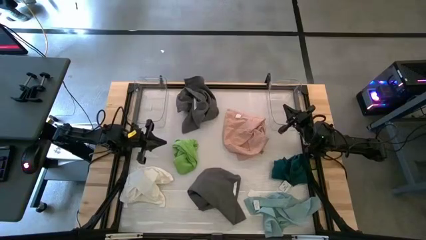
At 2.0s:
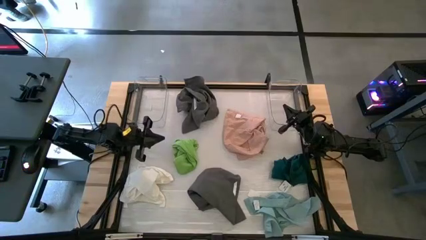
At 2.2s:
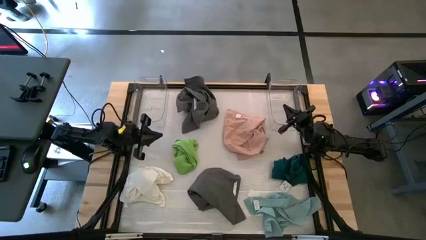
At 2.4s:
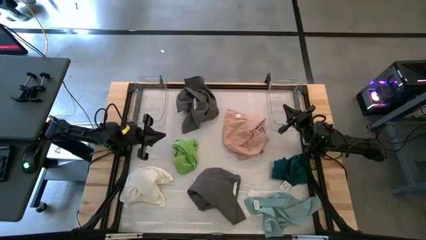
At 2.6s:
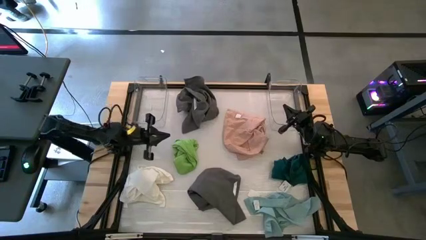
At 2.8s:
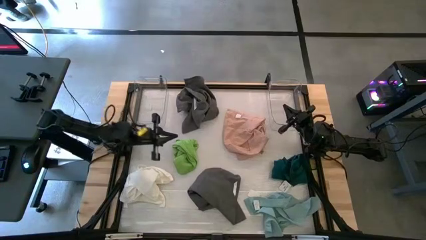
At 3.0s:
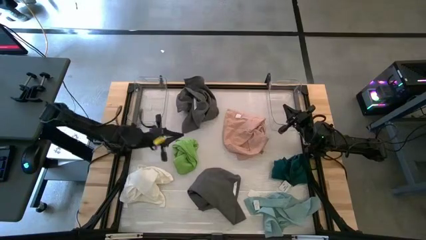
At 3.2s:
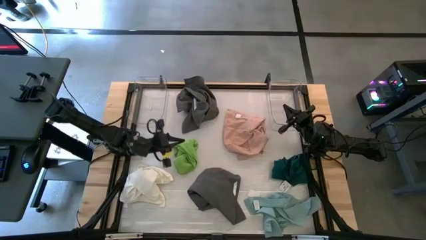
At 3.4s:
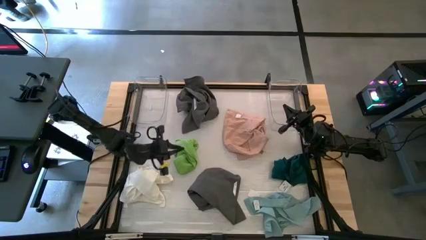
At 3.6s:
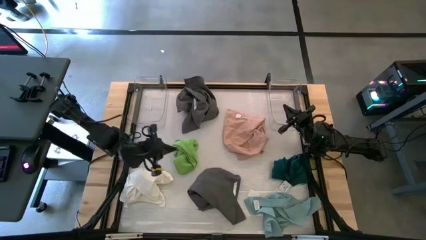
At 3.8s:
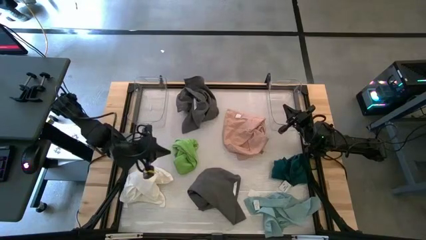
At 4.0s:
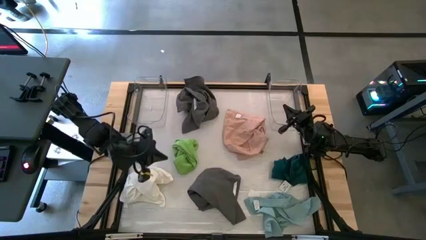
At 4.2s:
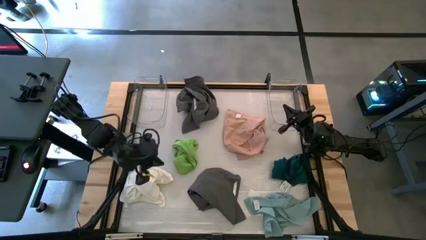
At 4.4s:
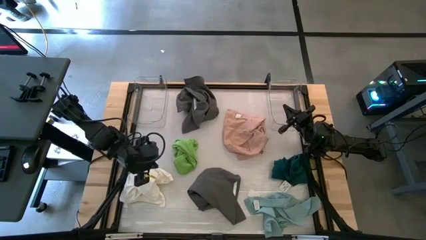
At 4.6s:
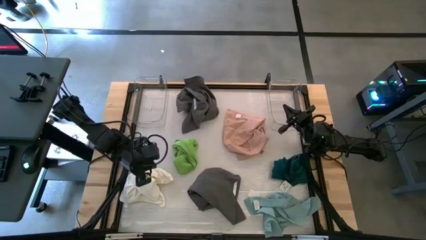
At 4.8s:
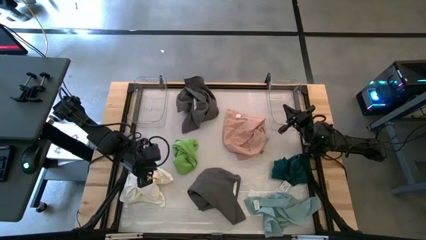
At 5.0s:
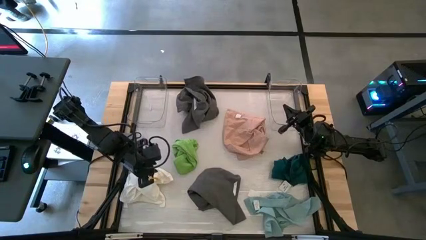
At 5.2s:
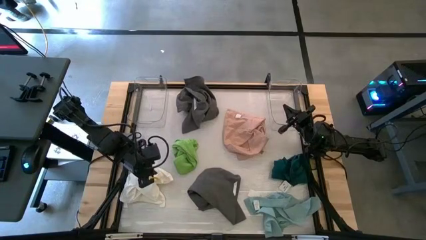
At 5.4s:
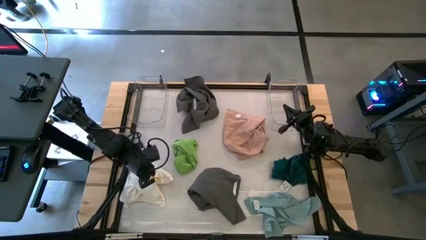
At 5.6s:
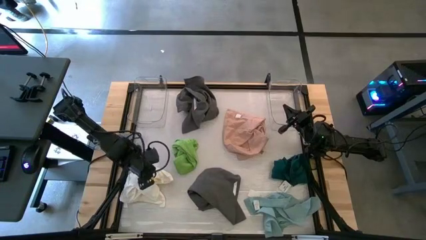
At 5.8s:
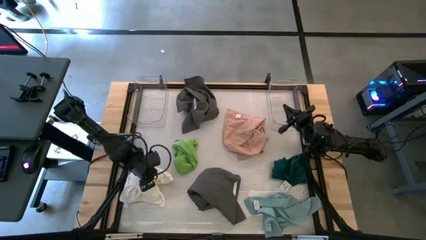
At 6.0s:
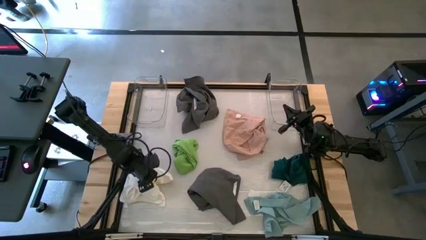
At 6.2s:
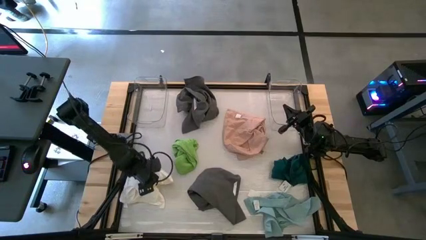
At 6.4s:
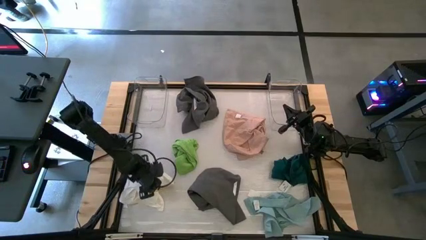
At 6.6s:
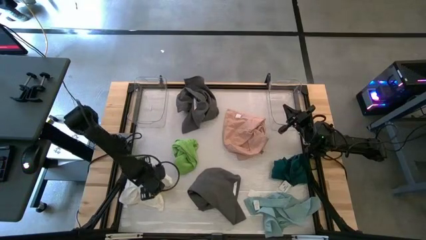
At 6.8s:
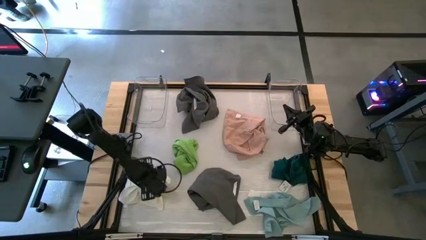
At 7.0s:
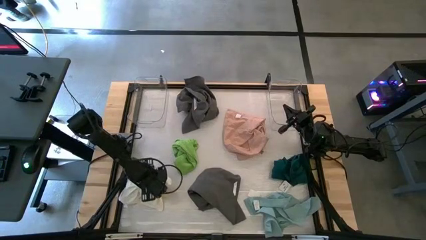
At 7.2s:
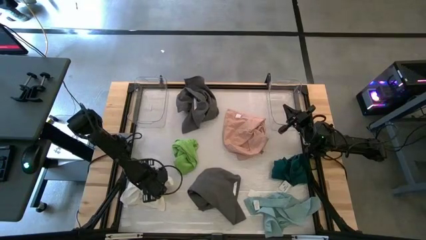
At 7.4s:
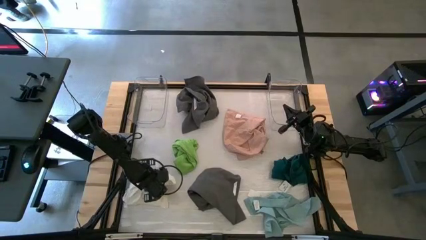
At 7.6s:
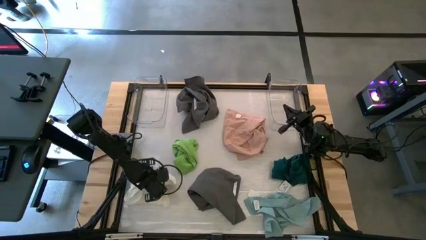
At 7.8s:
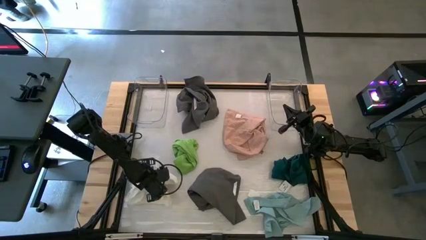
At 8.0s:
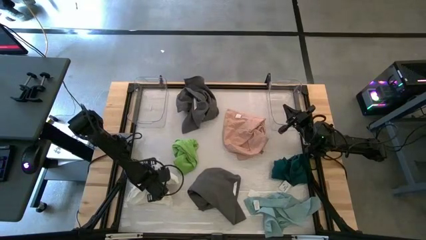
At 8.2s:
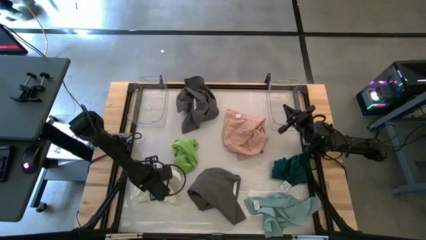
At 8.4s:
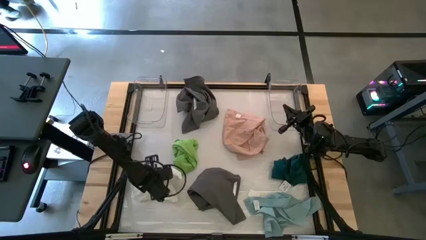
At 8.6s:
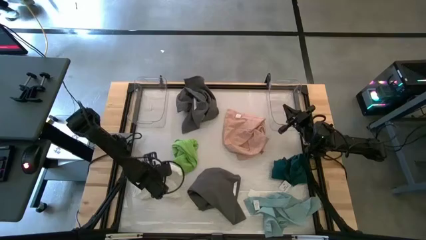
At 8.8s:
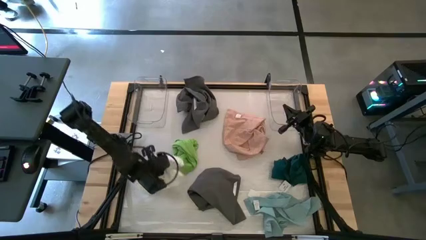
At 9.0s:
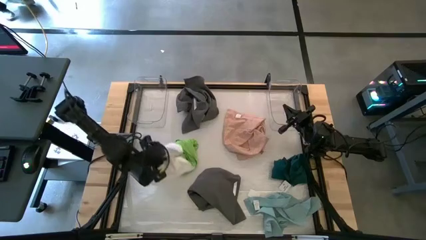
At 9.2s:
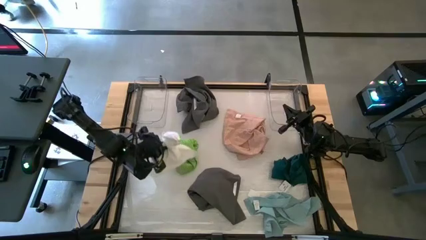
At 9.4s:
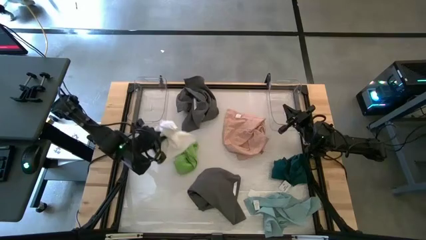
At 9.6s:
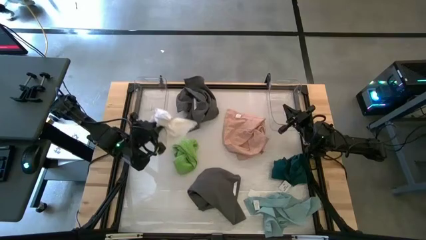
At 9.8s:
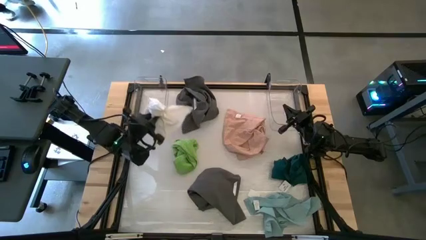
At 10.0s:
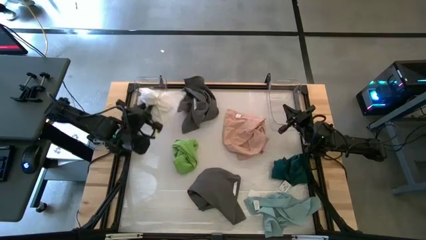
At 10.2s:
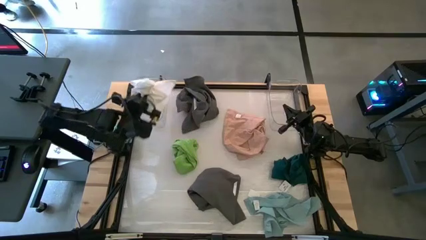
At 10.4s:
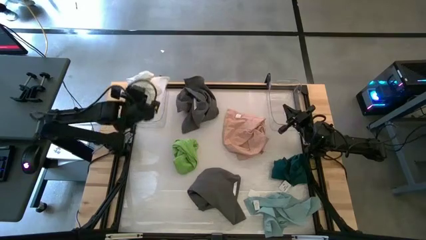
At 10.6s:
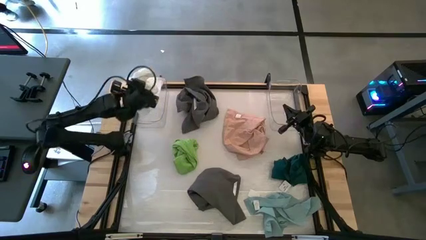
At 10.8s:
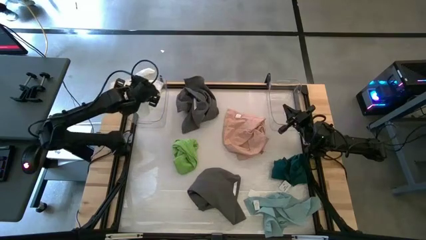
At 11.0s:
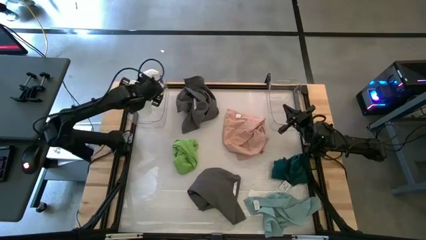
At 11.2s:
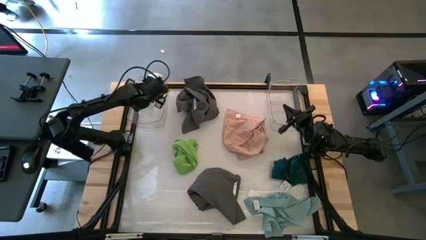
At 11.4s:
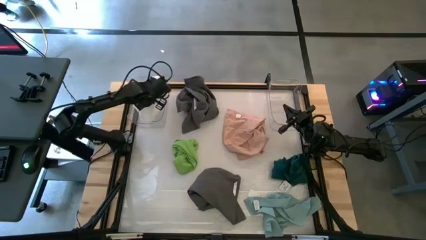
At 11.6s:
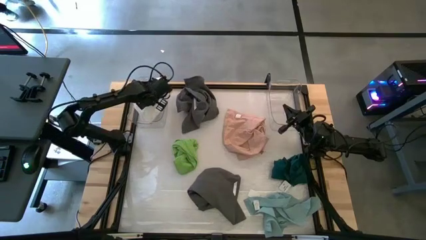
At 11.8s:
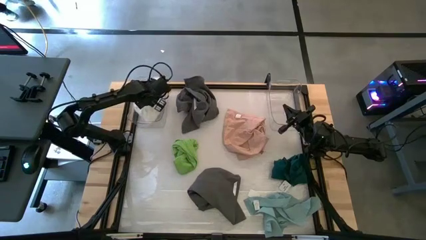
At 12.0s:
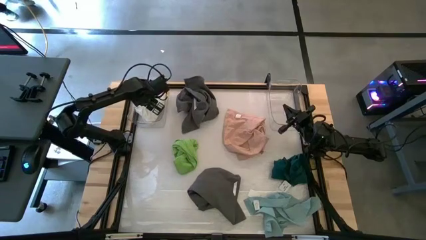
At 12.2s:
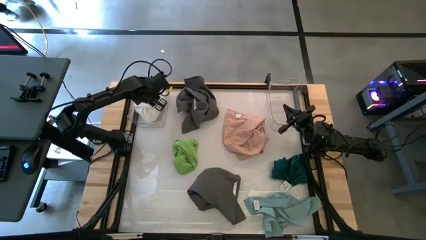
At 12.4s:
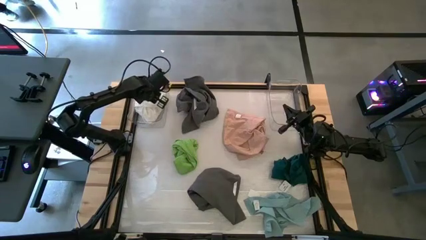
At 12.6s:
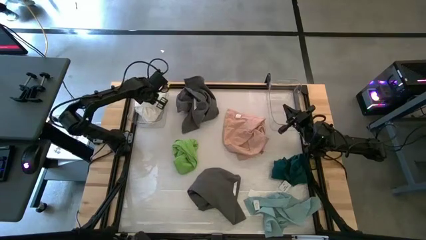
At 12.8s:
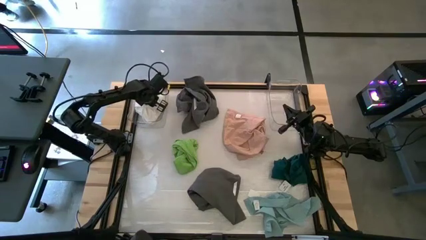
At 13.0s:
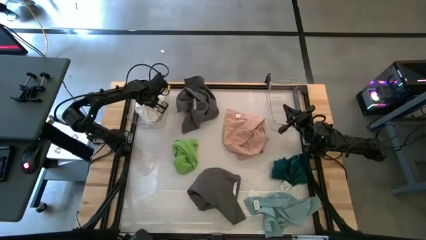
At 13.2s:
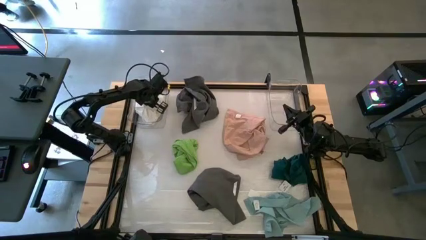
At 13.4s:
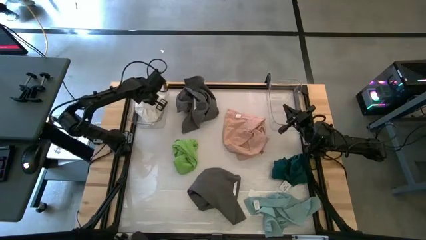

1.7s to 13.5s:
Task: Sort towels by color in basket
Put the white towel into the left transparent bin
